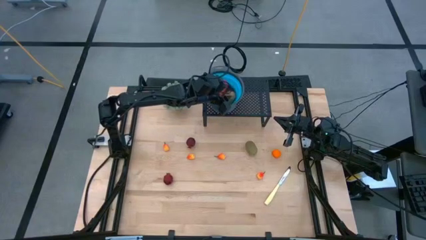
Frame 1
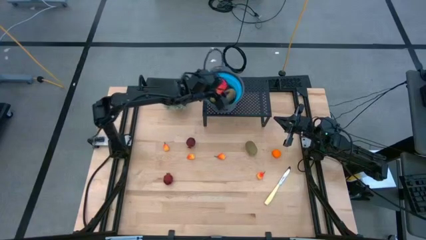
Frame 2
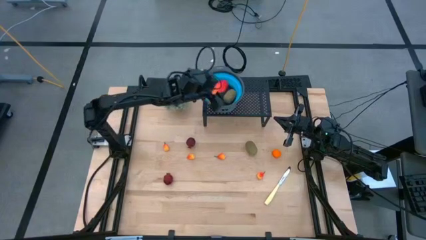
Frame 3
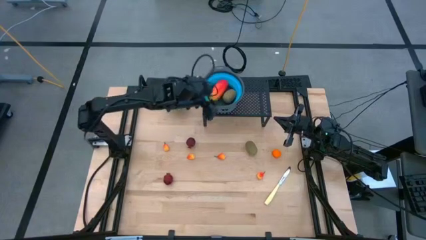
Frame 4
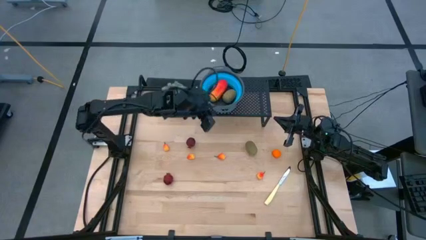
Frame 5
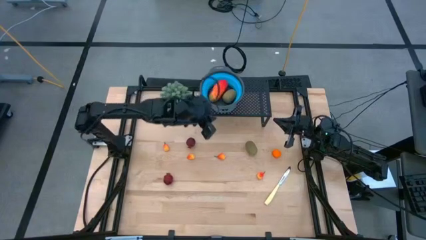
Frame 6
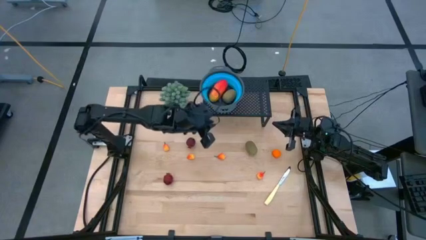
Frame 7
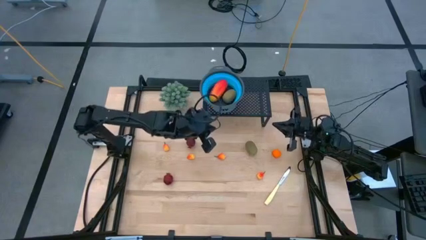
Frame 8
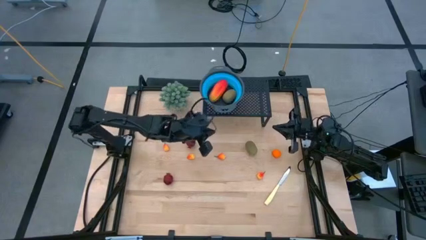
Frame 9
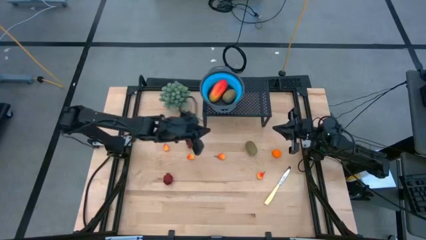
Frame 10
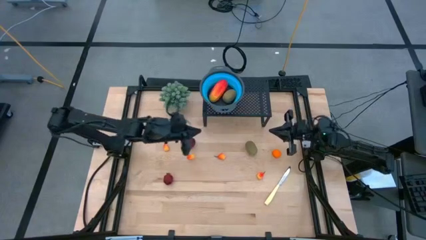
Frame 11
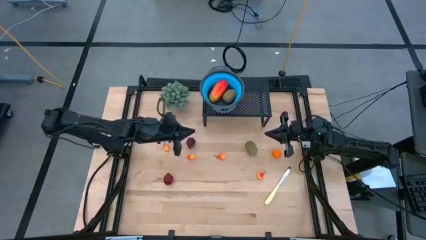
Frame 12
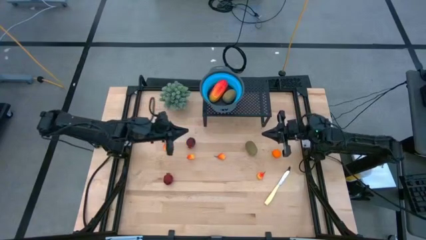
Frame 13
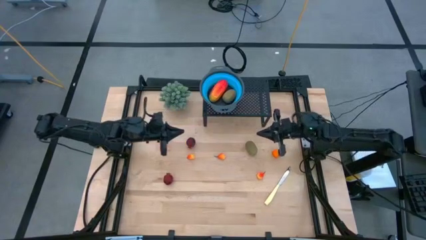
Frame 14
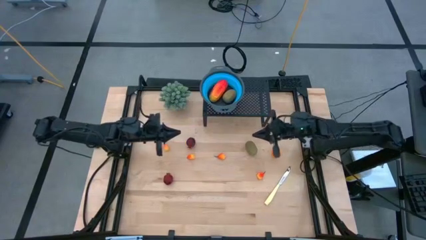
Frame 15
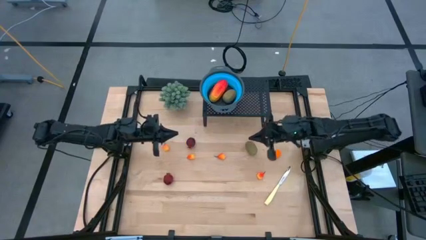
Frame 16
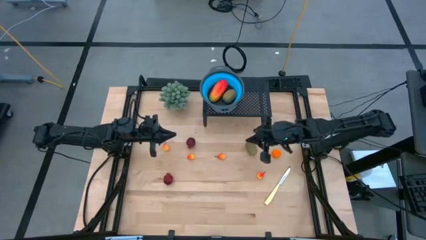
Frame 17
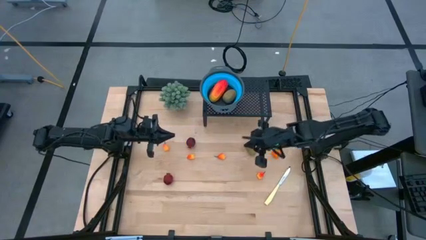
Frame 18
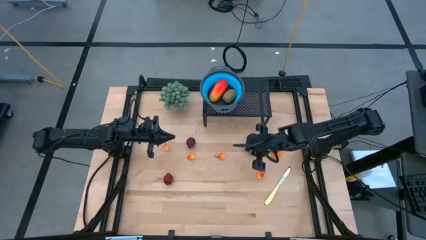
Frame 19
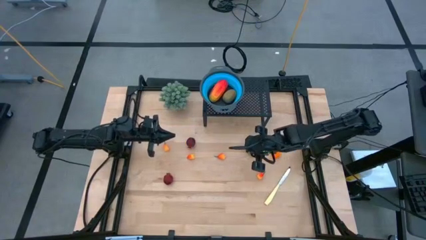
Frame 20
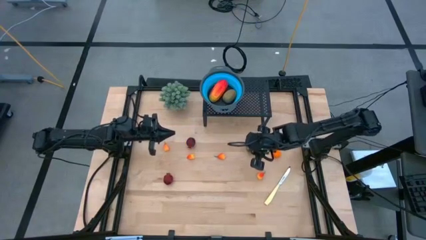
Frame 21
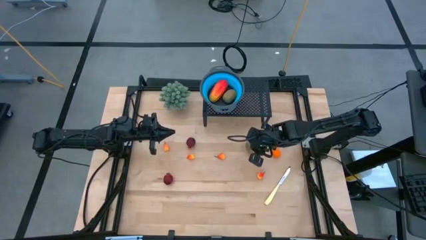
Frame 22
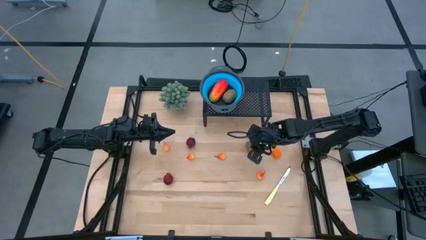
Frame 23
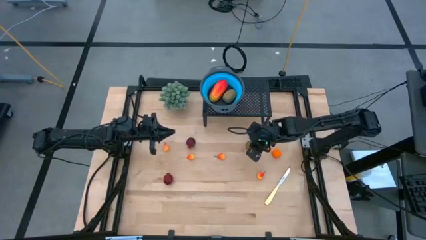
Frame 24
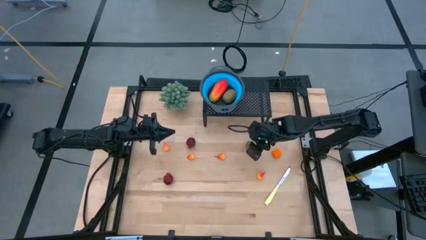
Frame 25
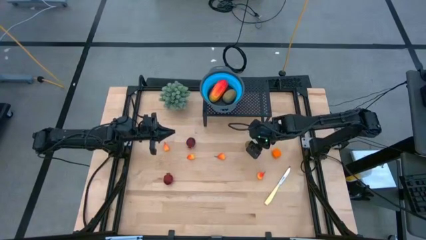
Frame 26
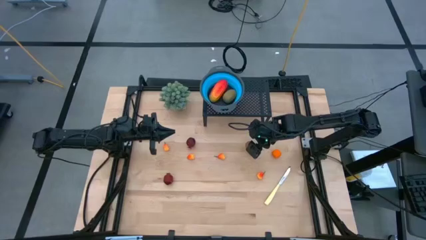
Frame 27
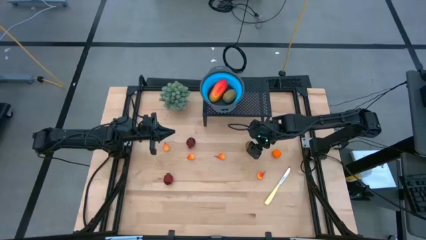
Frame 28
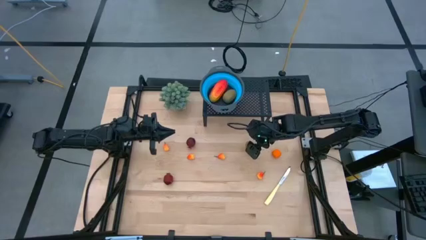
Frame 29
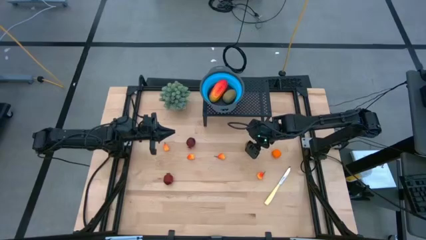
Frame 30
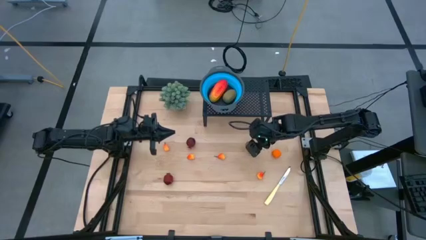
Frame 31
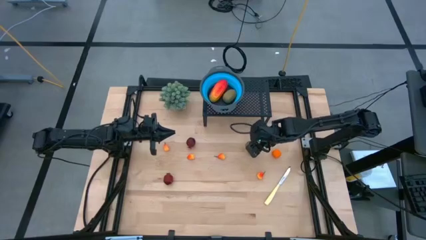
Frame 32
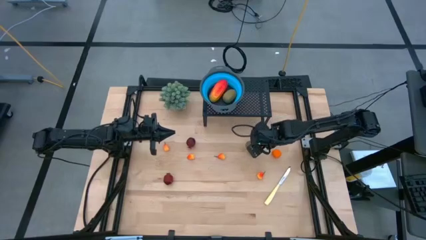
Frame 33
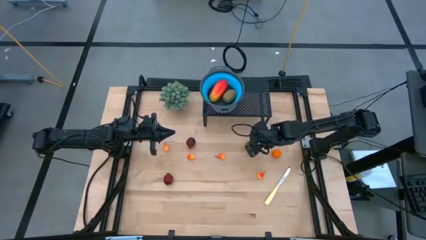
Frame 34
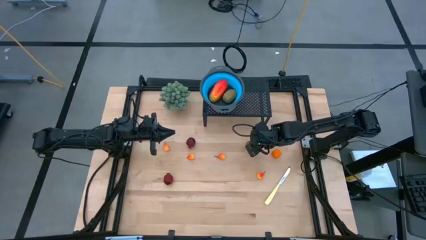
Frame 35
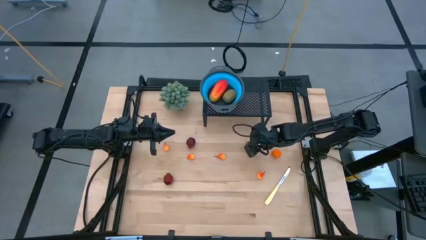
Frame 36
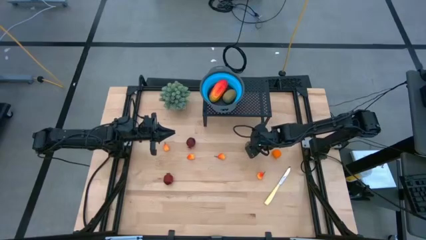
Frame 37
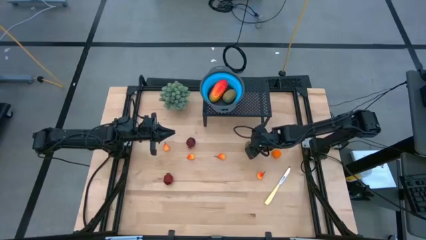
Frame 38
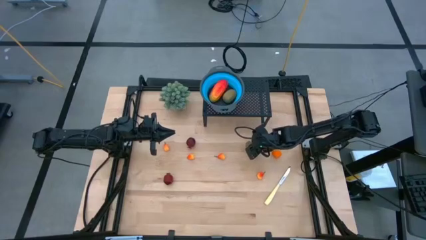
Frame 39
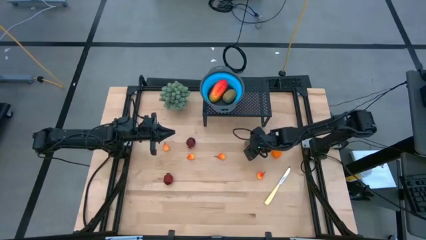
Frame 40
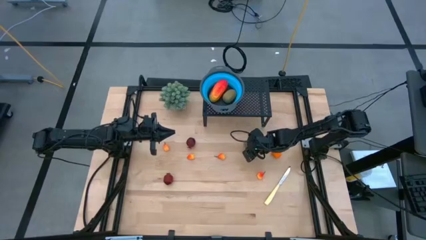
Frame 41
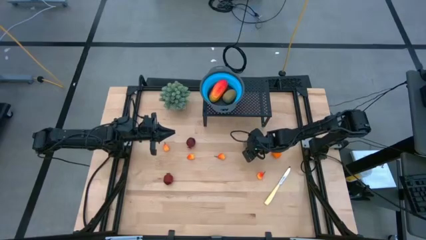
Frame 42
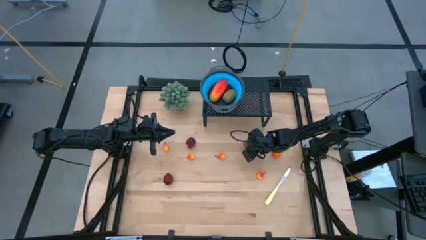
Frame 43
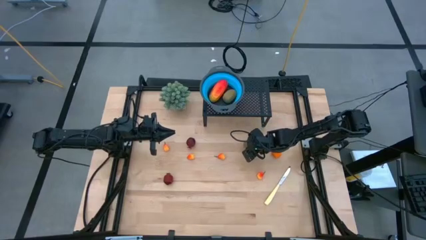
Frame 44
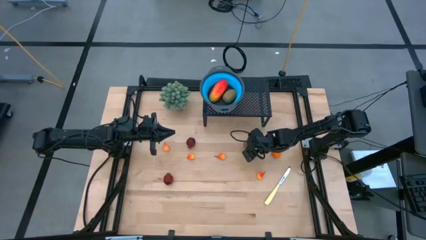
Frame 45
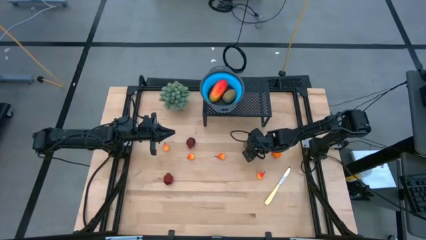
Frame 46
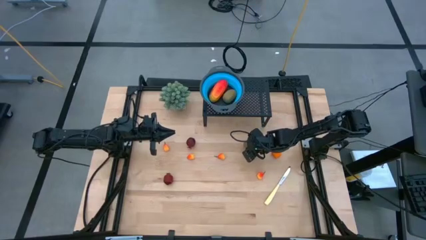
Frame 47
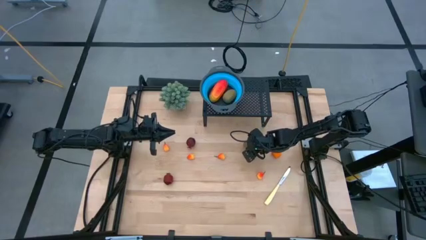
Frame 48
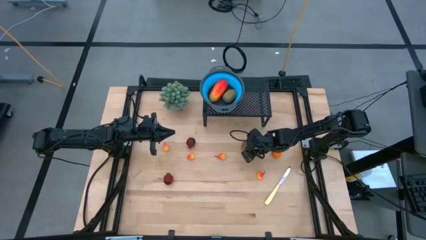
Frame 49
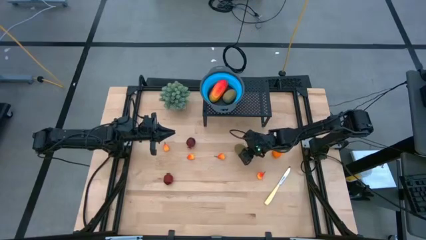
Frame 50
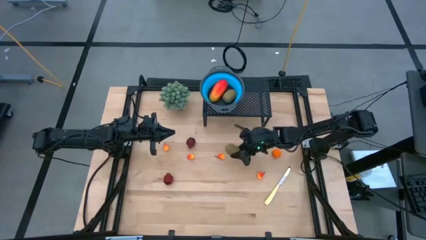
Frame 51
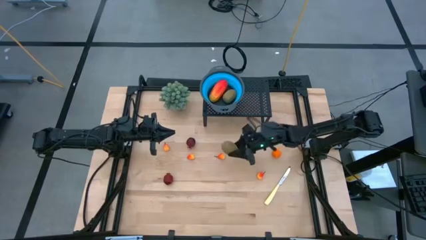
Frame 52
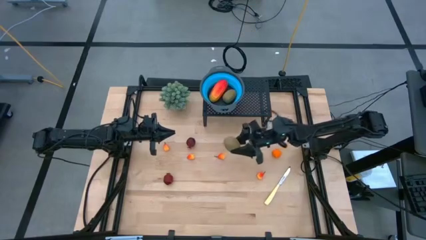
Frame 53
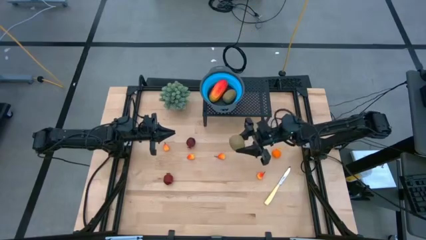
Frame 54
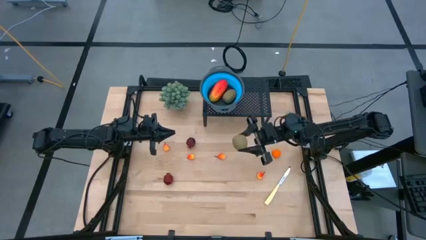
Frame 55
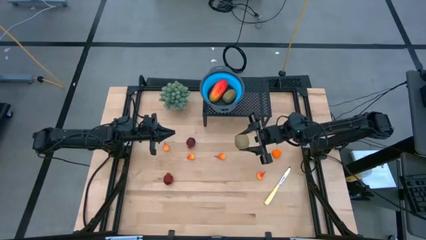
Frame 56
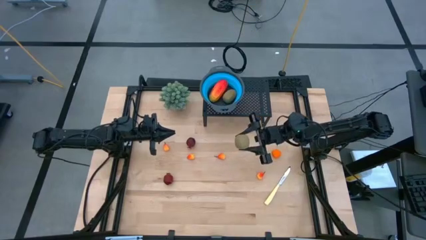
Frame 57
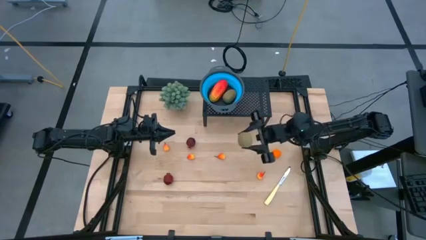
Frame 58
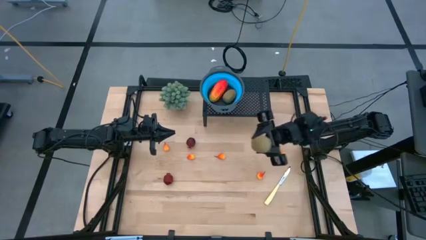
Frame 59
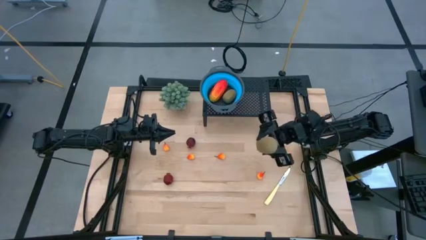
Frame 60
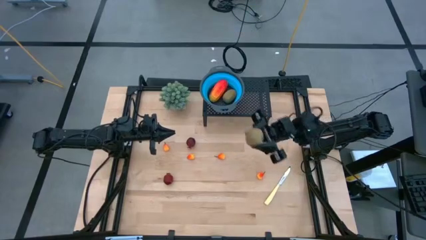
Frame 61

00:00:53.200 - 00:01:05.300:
Task: Pick & Place Fruit
Put the brown kiwi into the blue strainer bowl on the shelf
